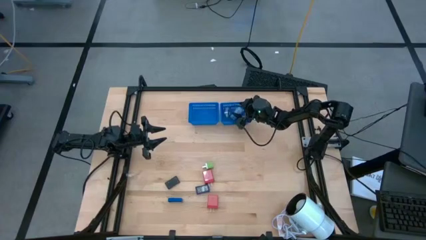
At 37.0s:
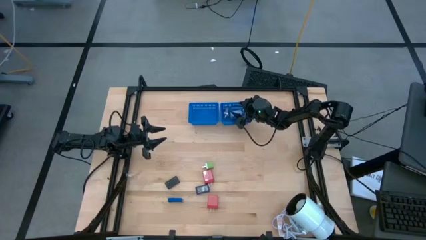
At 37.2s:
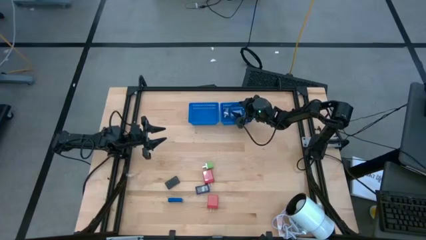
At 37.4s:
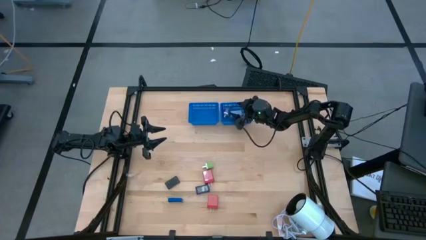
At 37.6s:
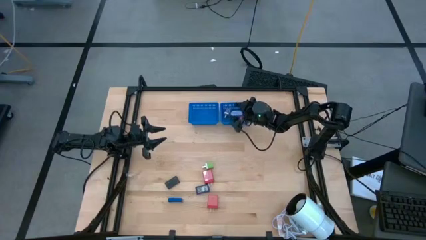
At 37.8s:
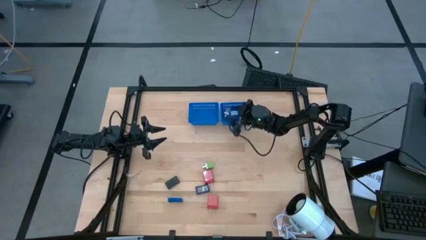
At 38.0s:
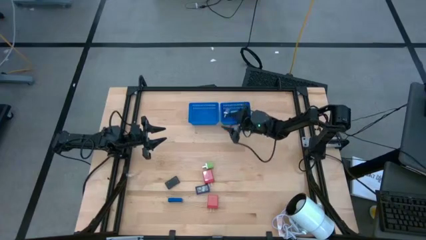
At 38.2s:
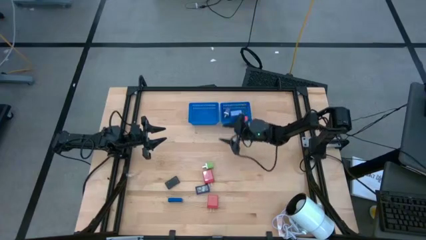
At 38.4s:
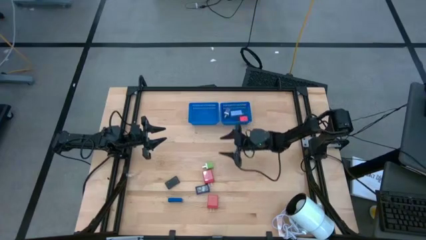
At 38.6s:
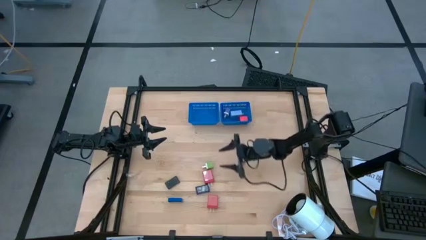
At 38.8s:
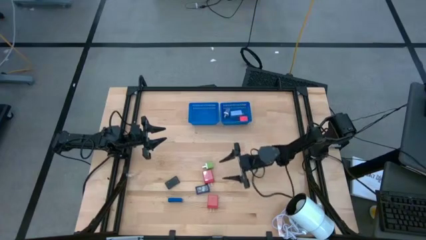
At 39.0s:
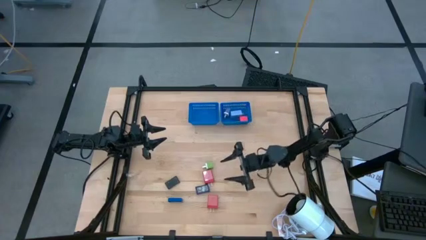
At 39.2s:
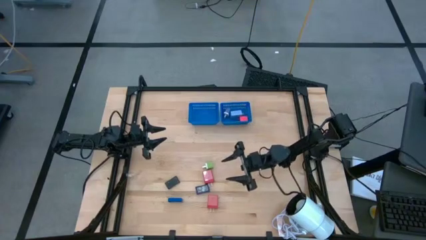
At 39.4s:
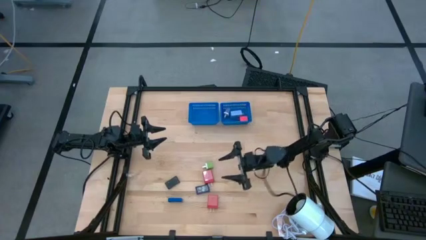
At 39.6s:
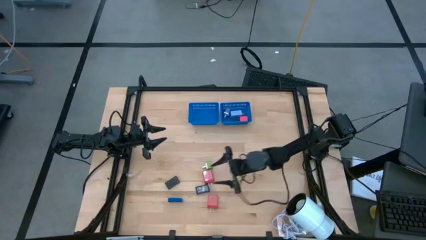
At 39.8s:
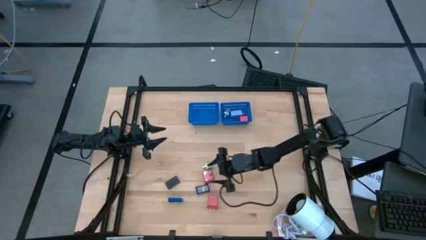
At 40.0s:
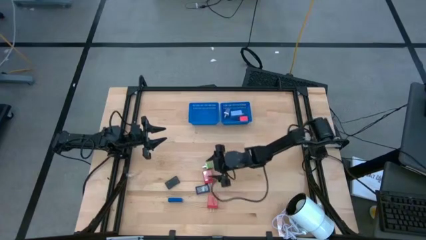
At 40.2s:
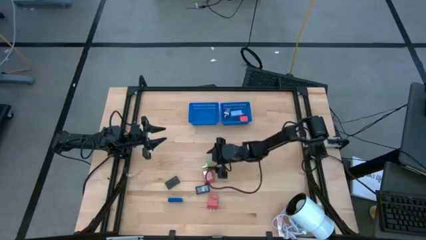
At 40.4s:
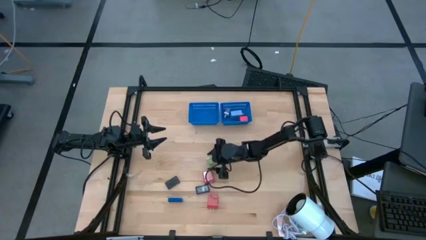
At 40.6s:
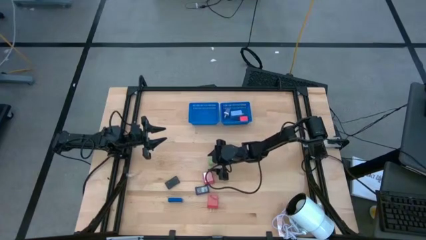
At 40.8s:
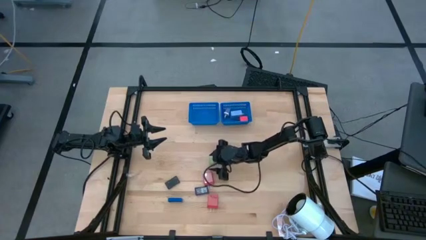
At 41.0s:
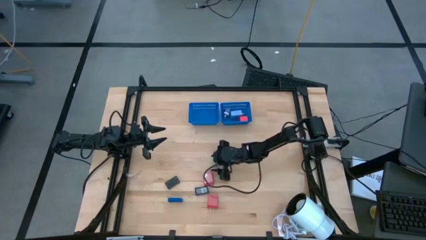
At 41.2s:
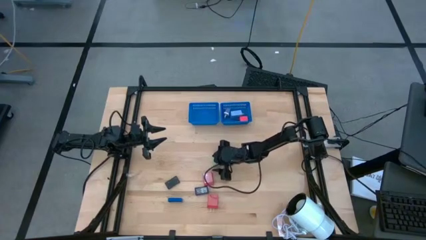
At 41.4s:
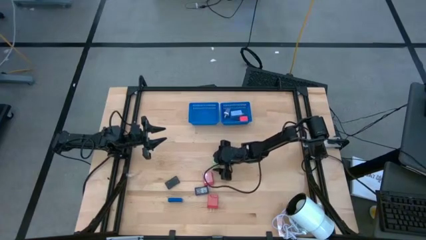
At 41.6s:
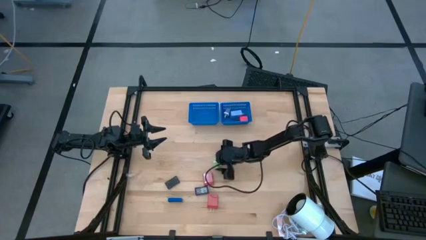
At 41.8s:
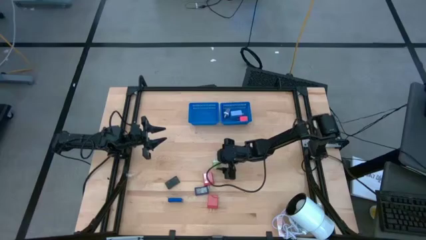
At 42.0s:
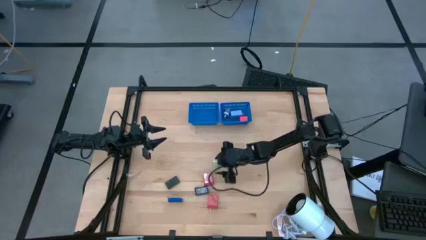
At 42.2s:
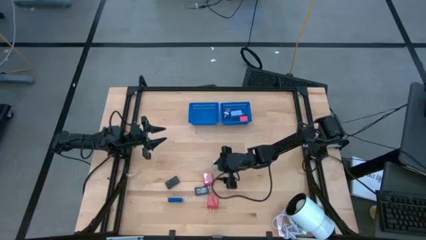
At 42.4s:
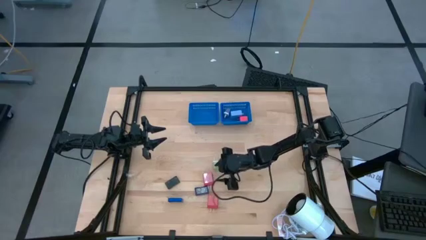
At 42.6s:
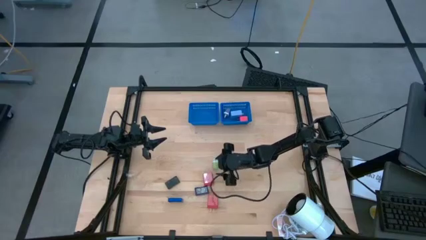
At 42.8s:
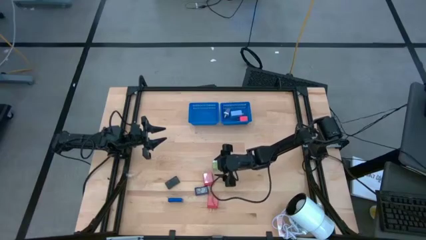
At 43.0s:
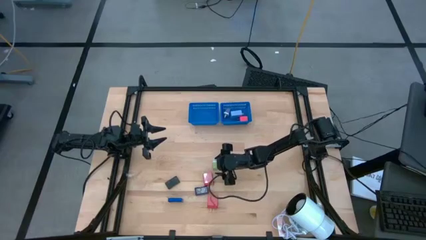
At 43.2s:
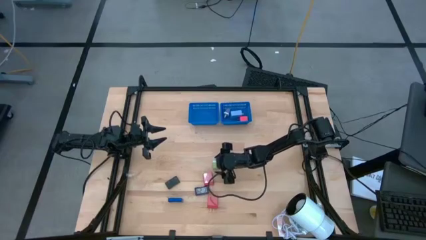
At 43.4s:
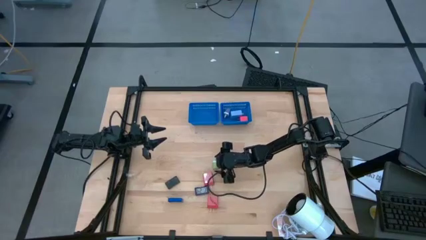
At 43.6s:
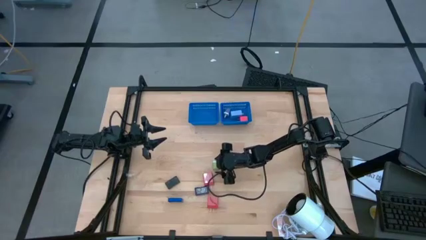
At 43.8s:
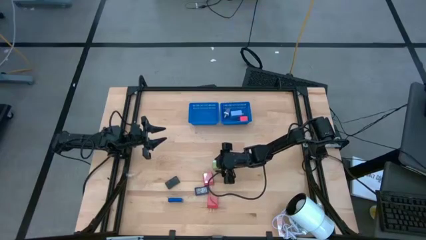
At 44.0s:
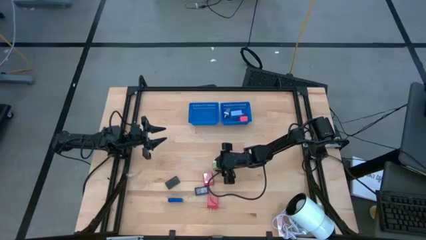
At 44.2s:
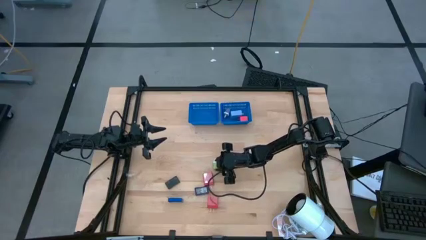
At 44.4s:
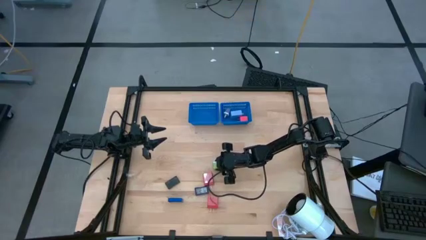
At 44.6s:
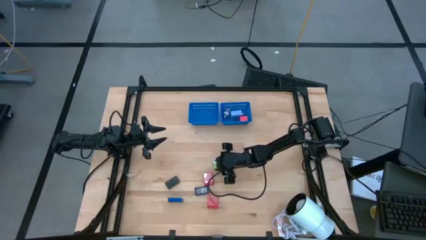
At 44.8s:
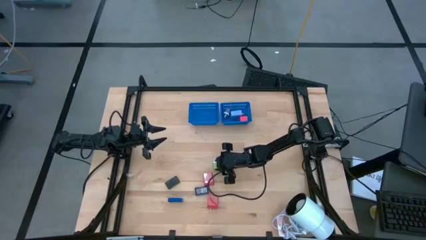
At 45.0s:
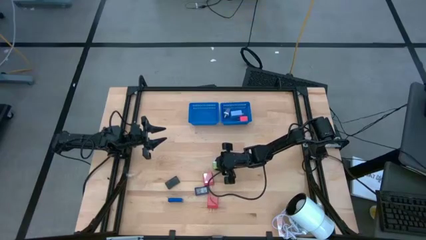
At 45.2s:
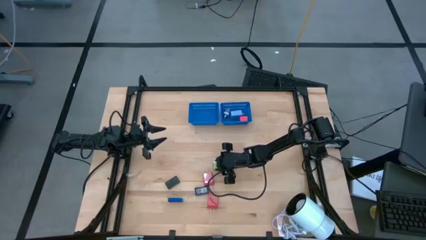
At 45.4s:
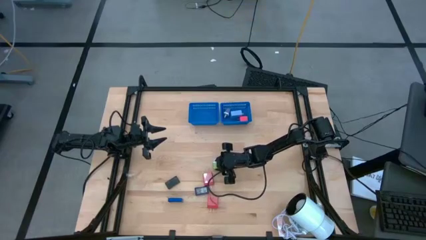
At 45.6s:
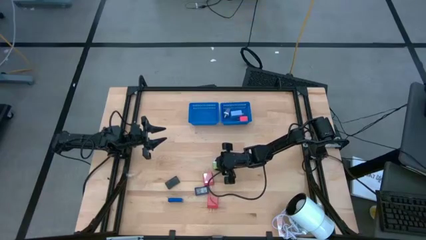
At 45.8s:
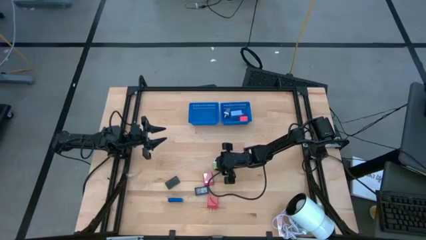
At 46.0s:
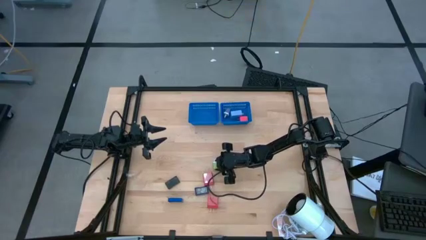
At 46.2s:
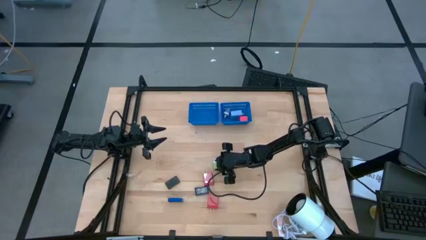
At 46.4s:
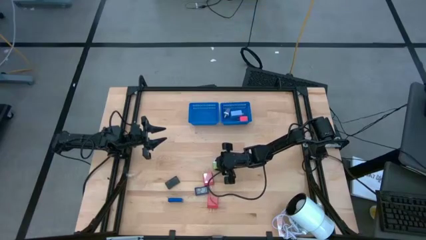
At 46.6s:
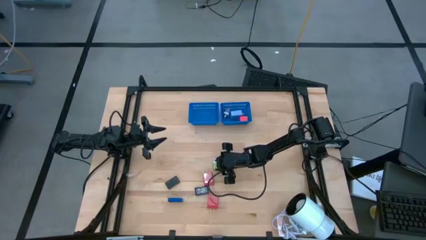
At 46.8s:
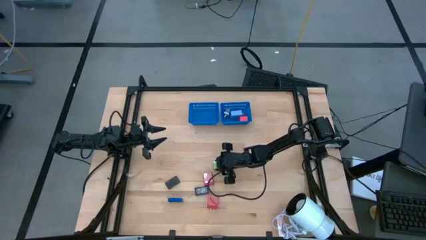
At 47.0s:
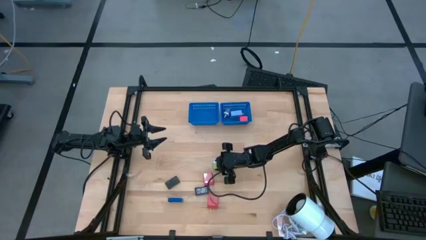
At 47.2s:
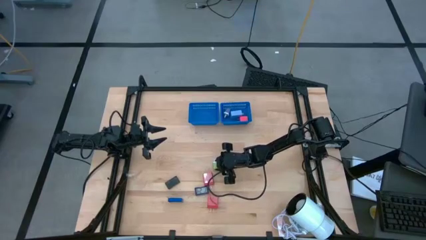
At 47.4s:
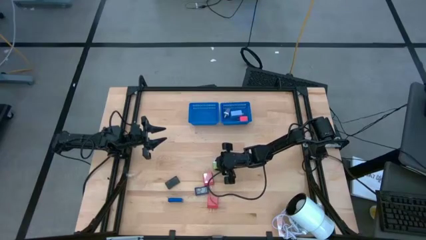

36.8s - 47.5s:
Task: Pick & Place Office items
Put the green charger adapter into the right blue bin

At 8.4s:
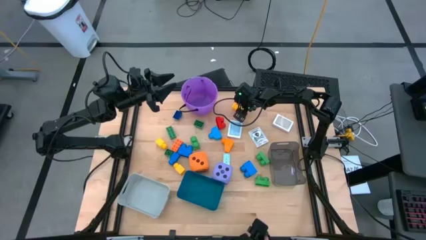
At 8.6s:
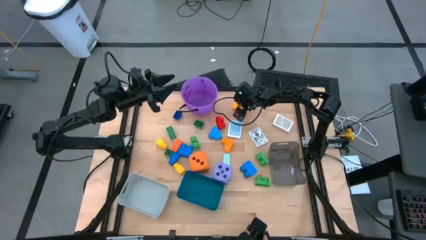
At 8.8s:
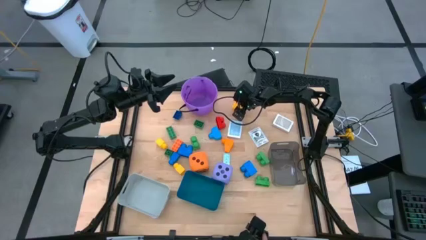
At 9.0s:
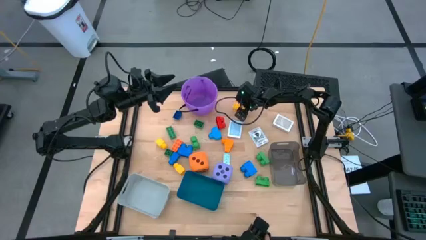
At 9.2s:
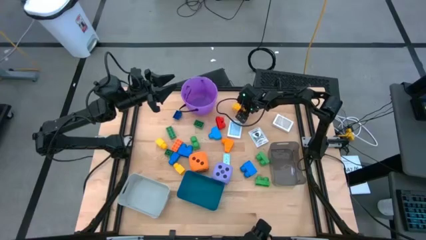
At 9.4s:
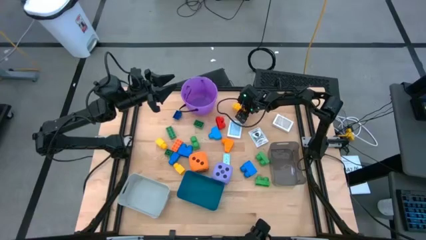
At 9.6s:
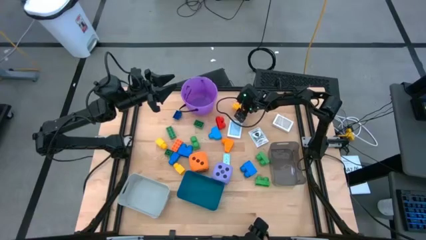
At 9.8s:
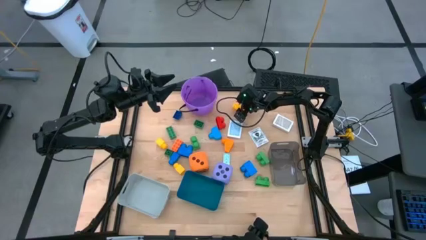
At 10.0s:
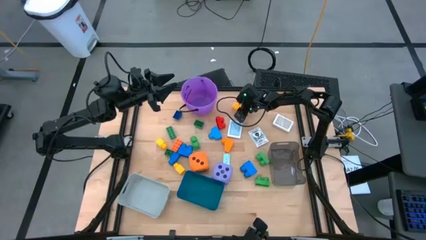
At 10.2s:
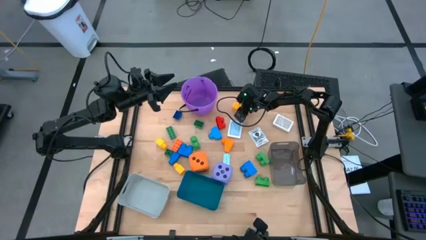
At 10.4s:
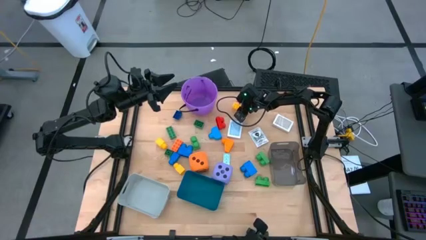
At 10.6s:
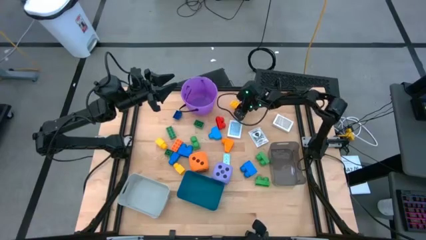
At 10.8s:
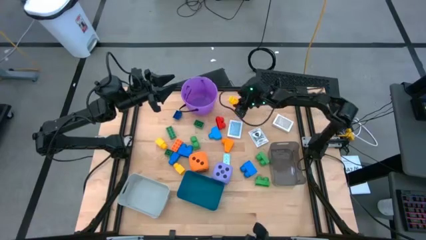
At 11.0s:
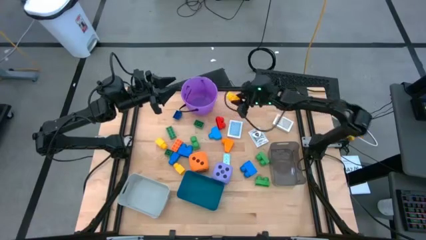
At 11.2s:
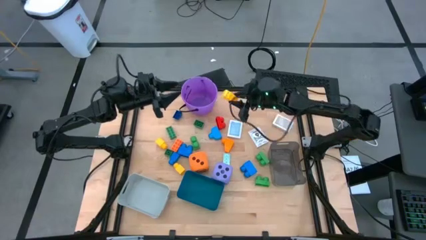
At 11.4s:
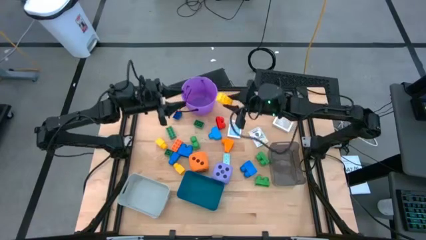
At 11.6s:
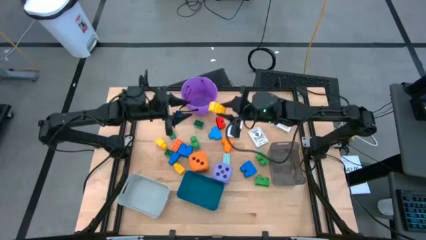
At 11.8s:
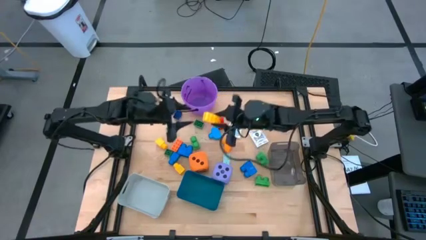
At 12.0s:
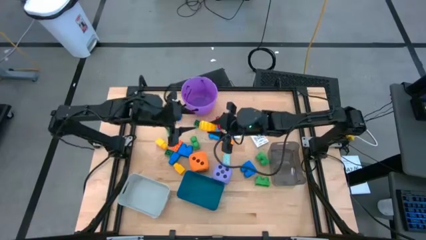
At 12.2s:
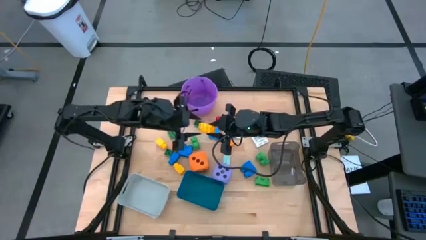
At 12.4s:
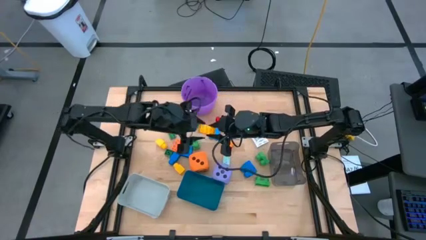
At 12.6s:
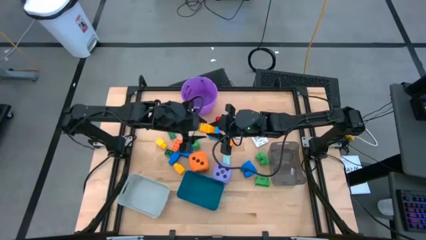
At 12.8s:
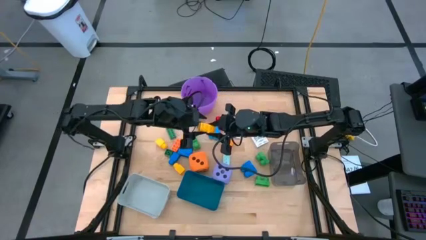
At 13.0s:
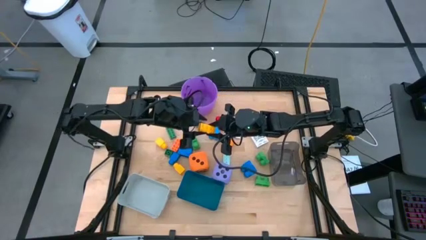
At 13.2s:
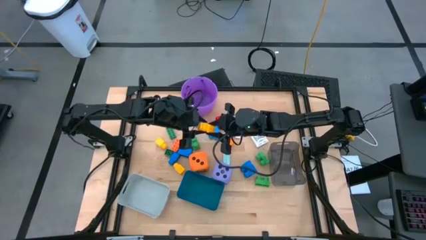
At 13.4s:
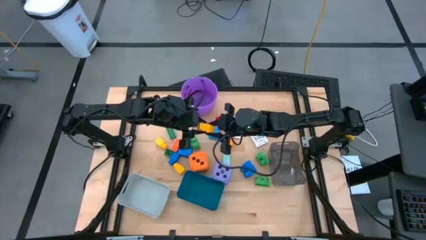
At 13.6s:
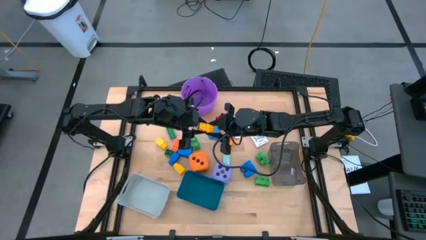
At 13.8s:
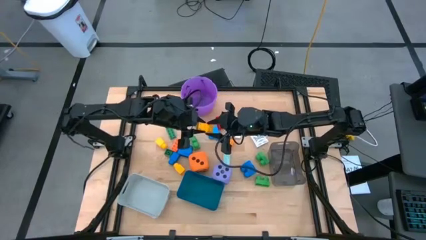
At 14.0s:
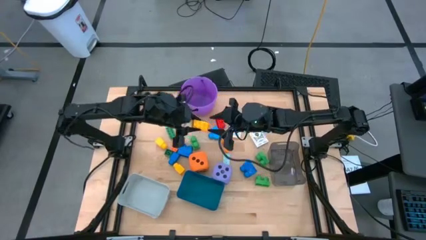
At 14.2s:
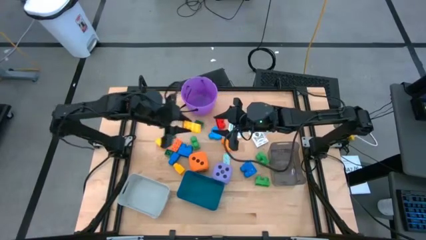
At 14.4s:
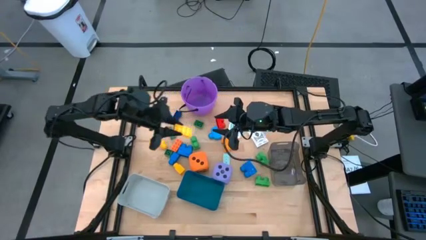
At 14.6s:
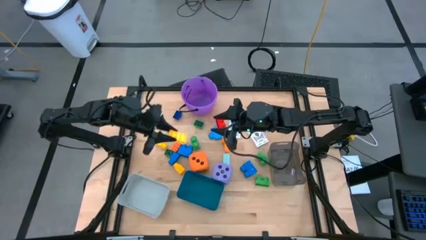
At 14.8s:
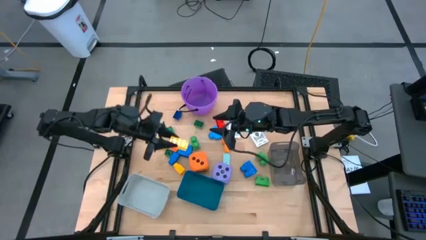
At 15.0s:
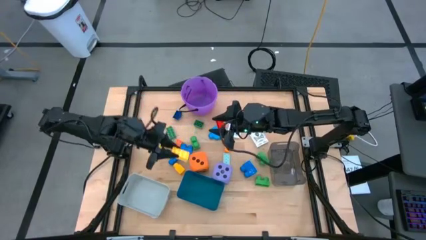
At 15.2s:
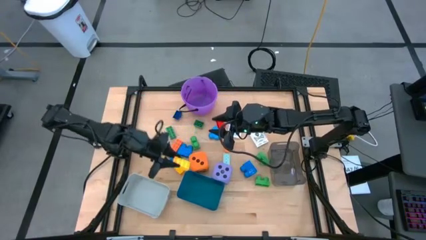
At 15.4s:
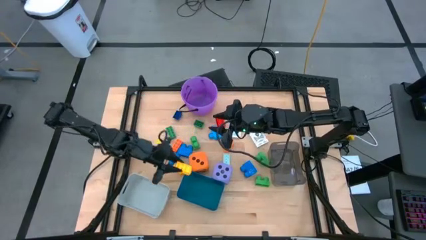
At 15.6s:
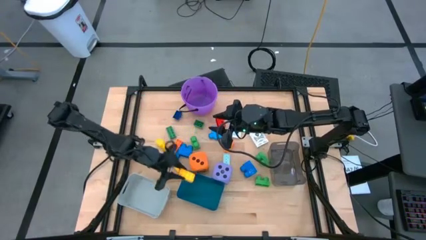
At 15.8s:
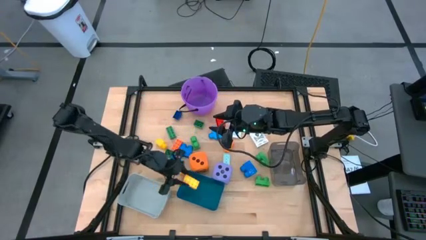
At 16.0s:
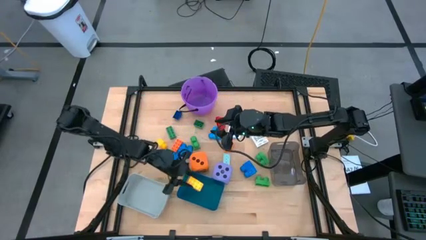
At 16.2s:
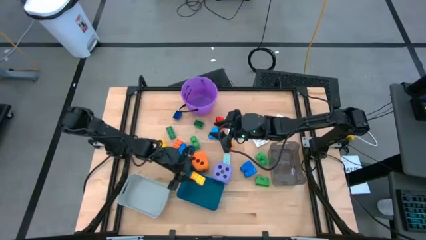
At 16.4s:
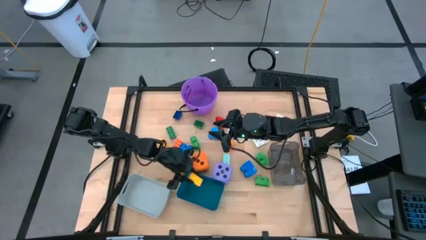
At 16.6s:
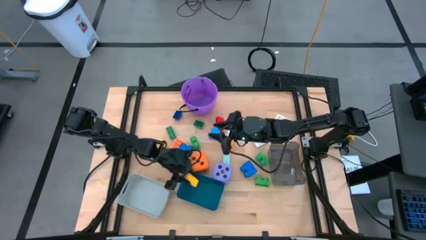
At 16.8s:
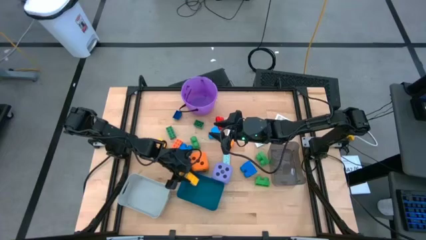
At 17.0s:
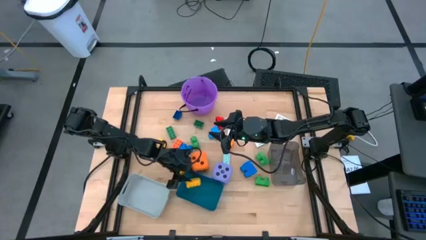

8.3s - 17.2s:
Task: Pick & Place Toys
Put the yellow game piece into the blue bin
